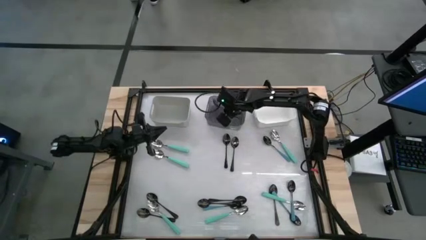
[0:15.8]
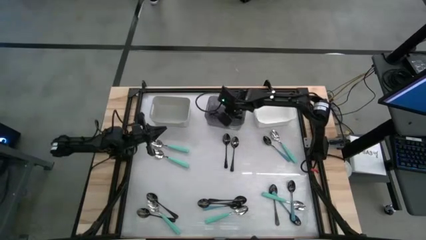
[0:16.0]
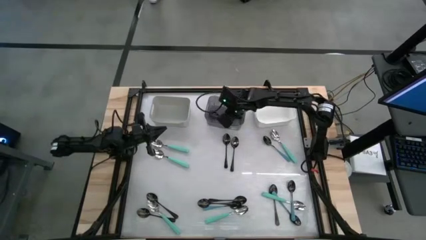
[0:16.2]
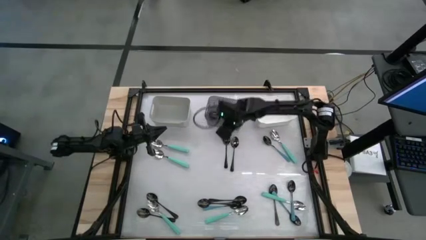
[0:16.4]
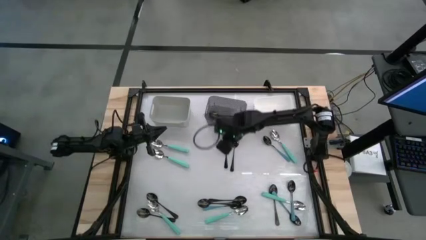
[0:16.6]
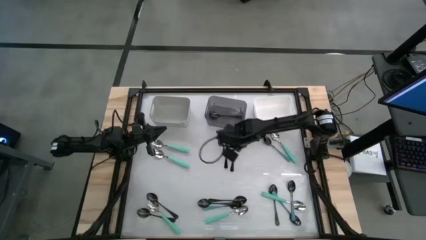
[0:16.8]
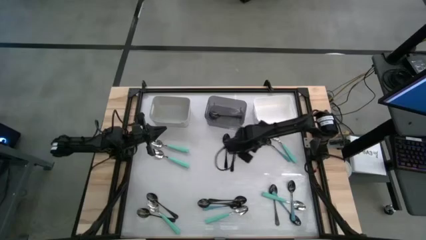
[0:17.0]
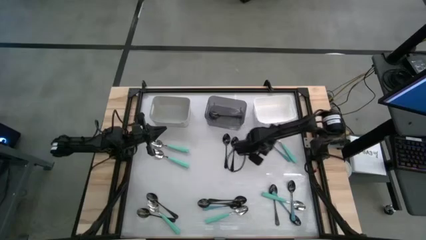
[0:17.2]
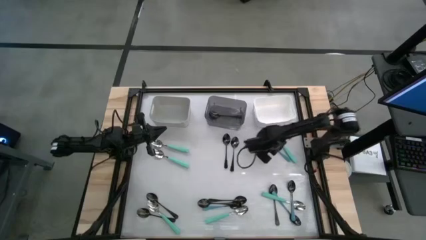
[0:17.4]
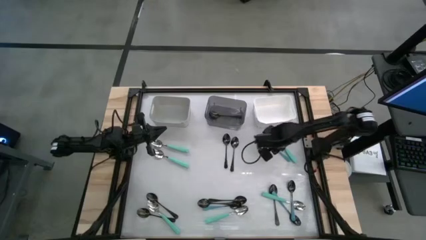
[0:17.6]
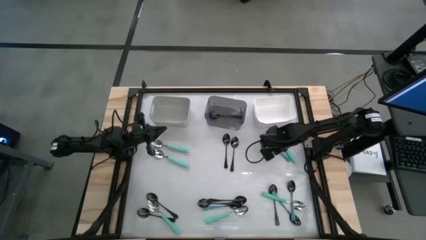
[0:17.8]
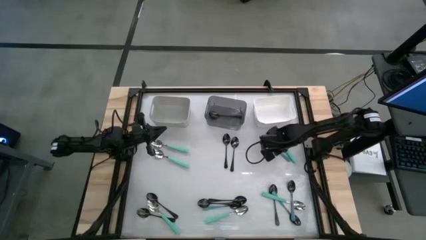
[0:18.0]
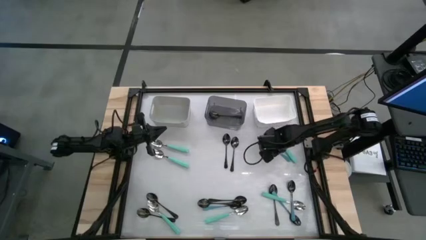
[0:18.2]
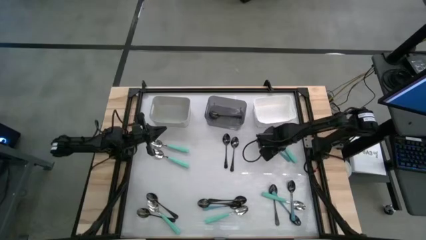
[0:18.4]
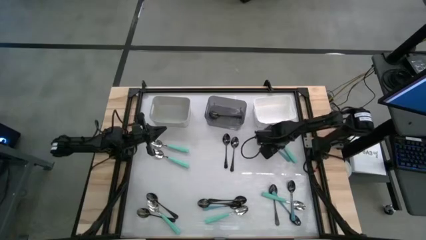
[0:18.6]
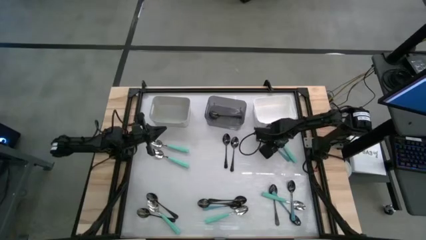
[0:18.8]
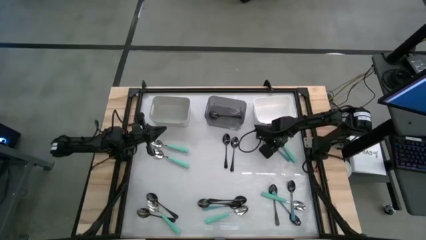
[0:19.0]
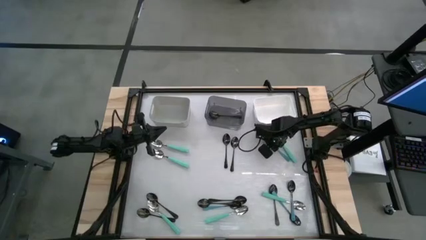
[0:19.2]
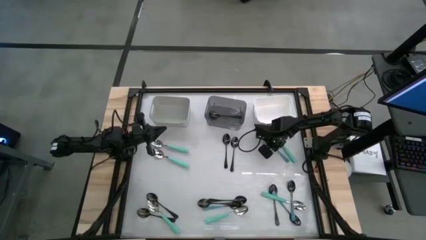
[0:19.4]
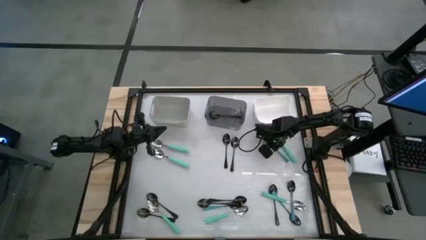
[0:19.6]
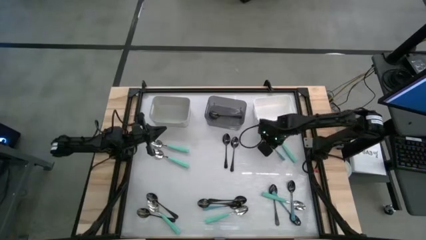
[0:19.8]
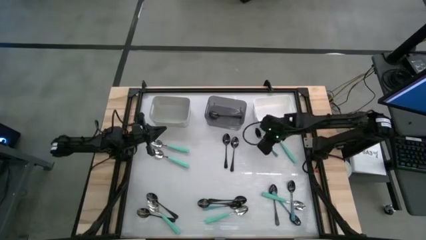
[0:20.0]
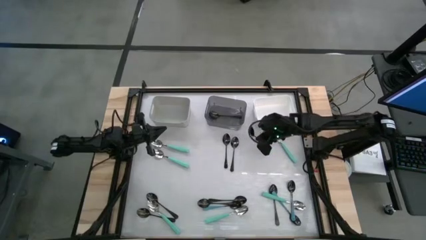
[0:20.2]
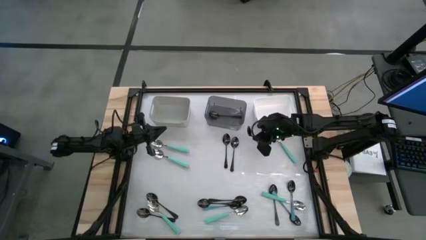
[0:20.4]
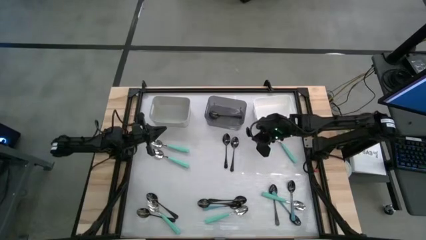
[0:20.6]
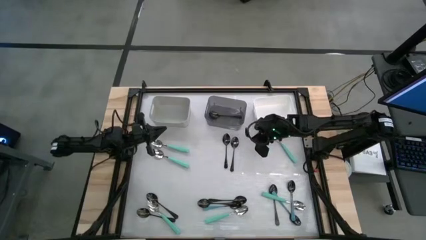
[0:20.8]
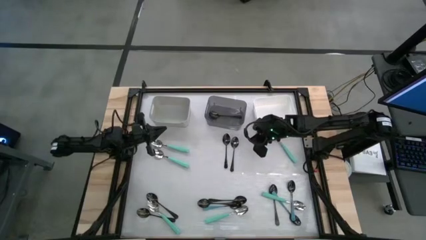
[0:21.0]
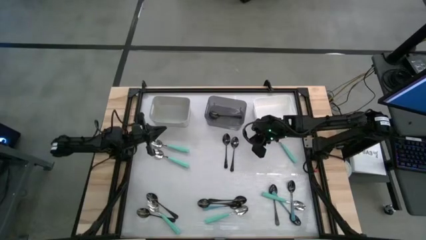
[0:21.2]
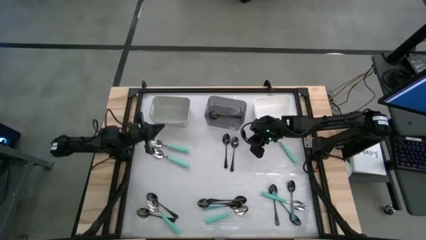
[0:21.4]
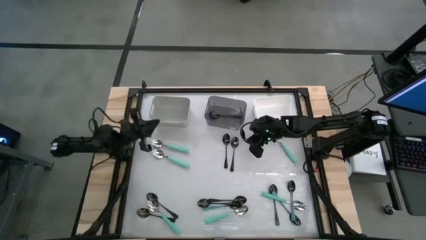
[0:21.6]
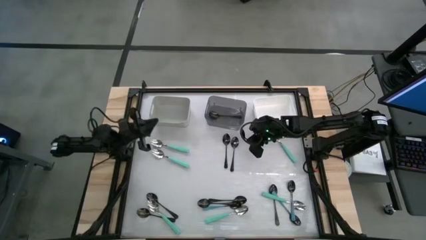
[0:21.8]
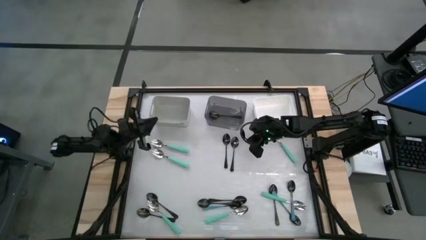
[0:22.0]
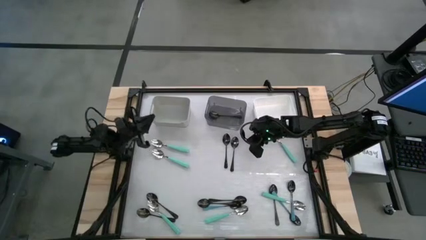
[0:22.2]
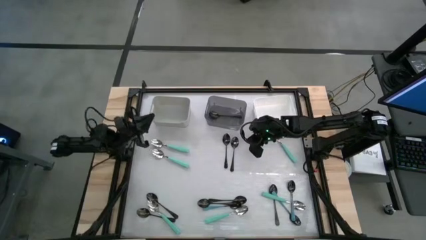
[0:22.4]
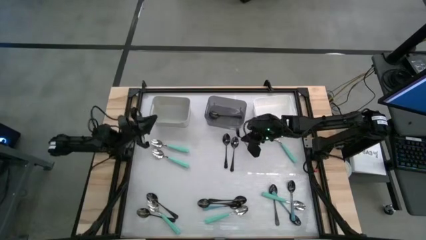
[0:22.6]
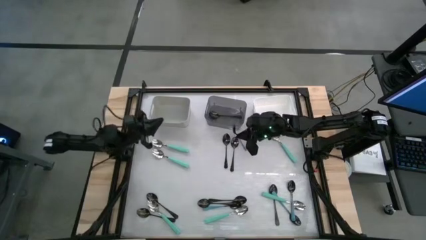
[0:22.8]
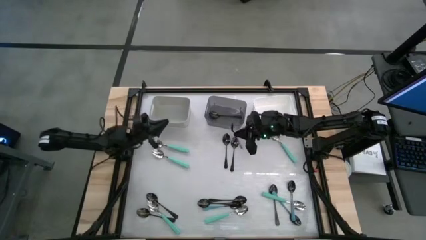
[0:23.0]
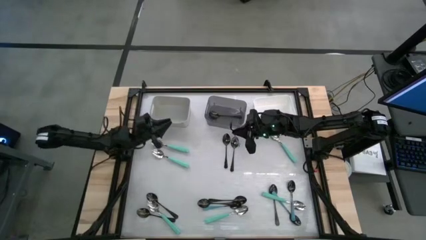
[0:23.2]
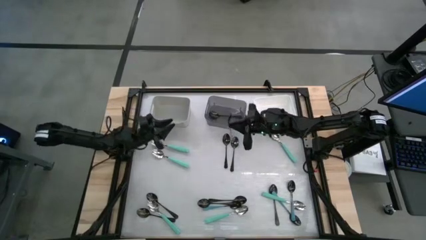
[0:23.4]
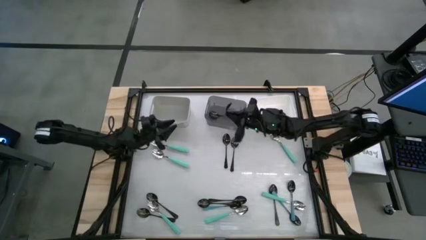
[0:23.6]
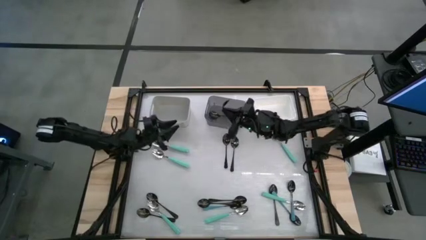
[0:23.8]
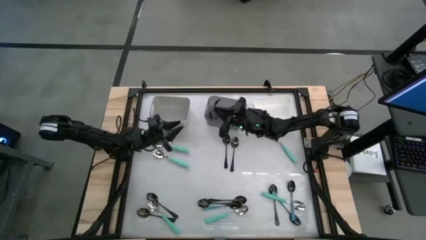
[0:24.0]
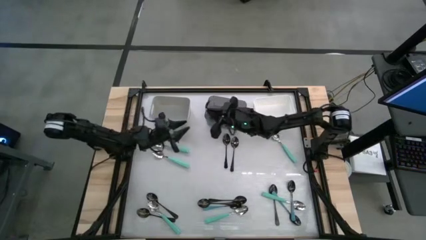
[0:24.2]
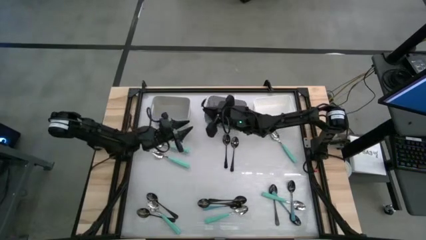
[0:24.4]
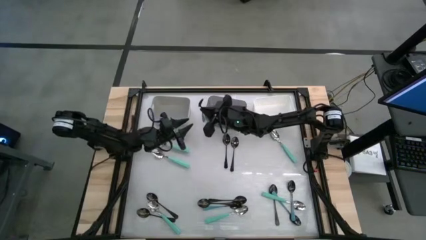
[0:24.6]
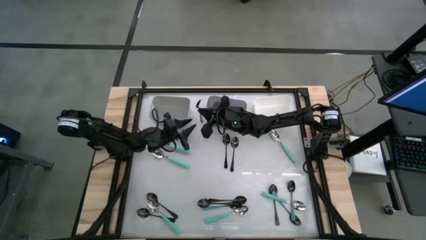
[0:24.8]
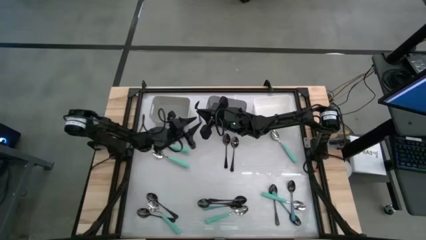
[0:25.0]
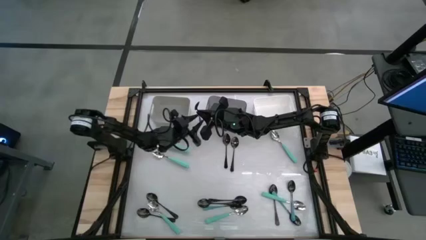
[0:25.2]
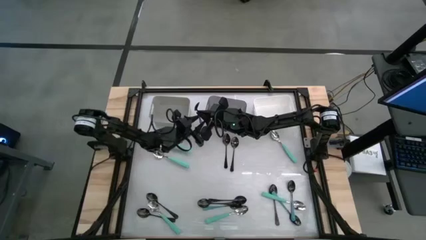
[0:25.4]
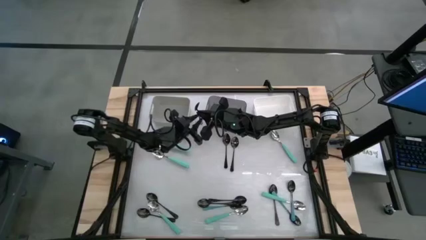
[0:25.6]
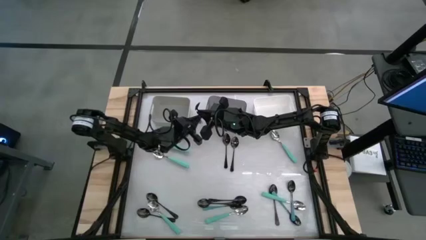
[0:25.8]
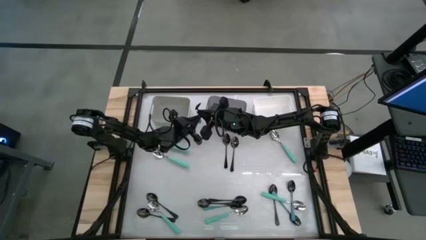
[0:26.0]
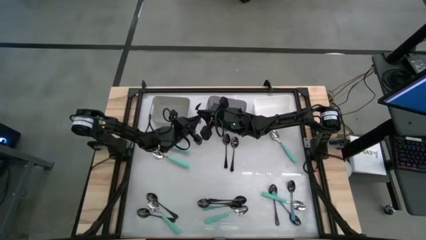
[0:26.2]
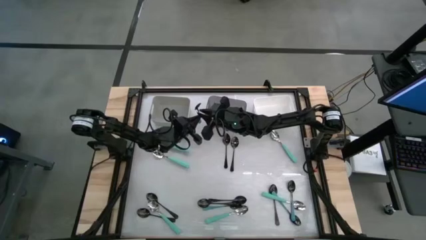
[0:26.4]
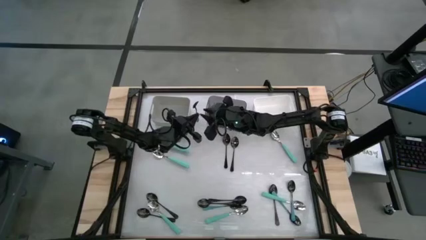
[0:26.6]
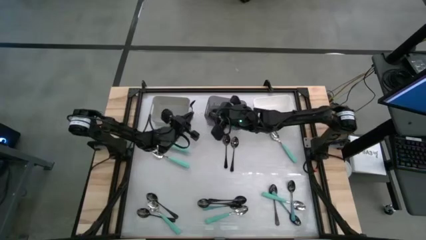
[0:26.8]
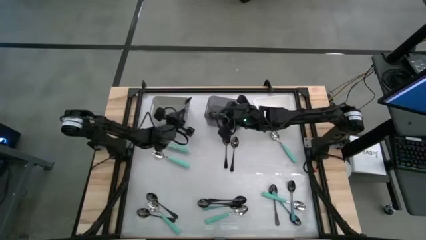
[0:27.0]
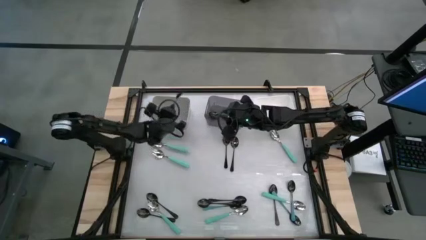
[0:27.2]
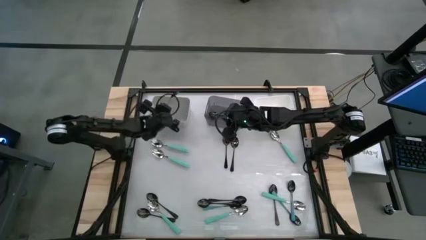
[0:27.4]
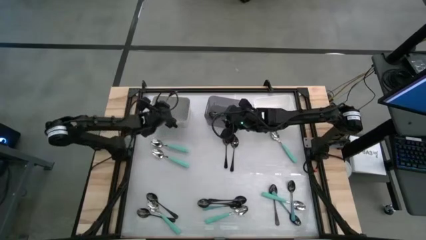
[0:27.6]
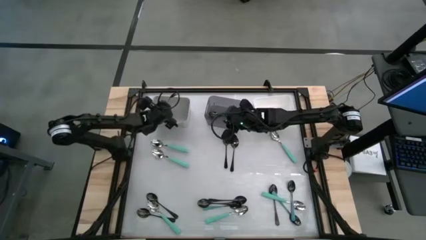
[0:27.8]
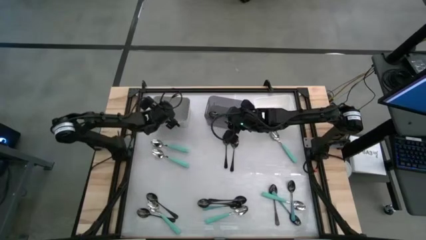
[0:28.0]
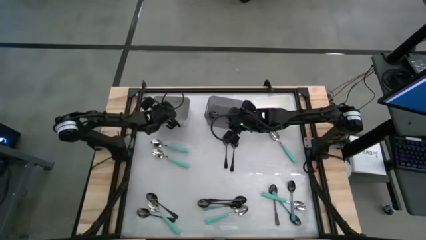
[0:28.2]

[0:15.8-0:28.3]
Task: Sort silverware by color (type)
Put the blue spoon into the gray bin
